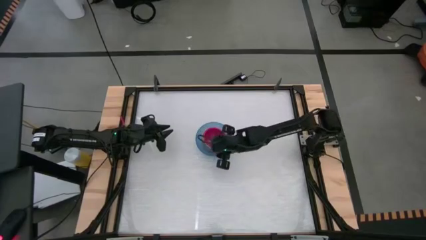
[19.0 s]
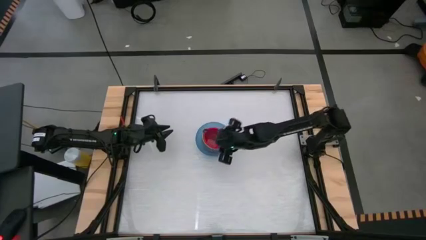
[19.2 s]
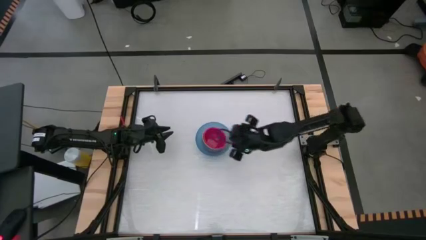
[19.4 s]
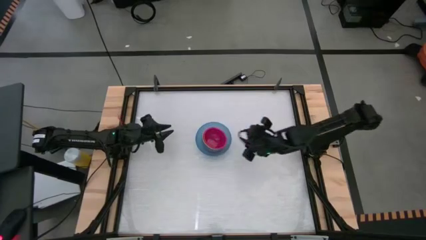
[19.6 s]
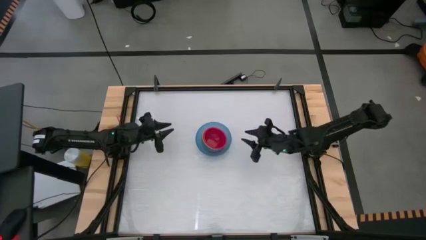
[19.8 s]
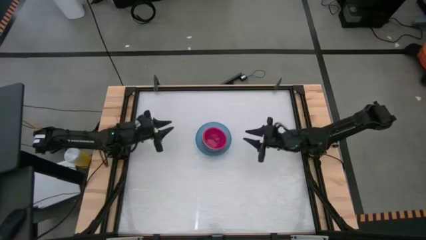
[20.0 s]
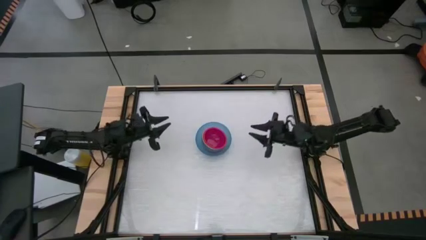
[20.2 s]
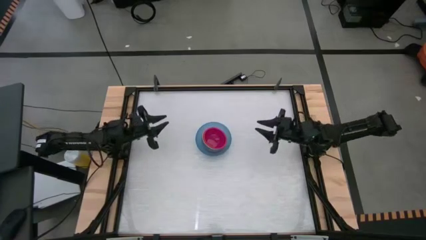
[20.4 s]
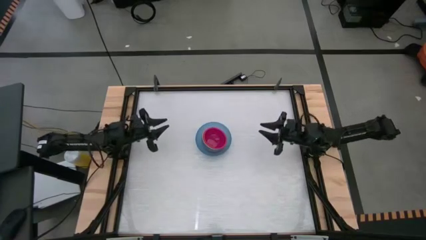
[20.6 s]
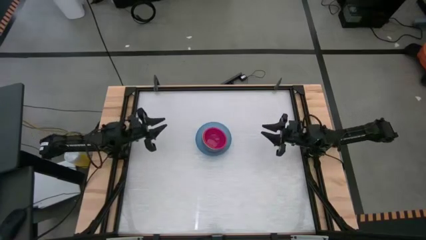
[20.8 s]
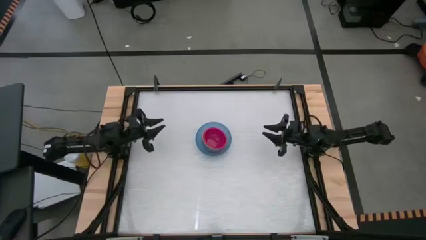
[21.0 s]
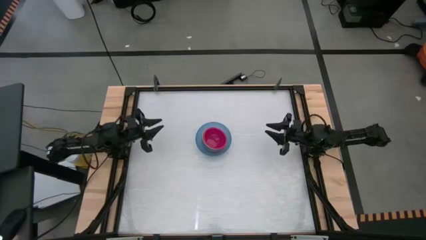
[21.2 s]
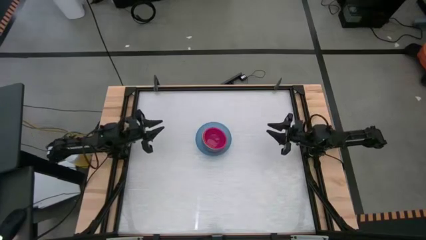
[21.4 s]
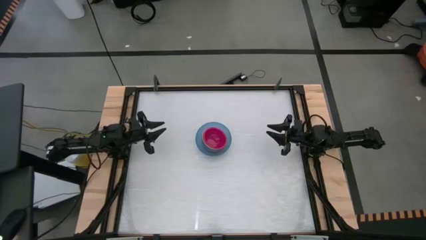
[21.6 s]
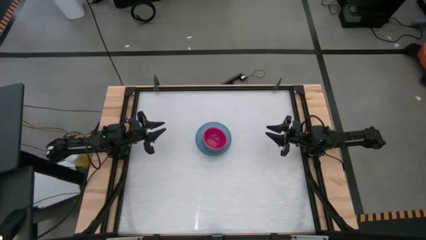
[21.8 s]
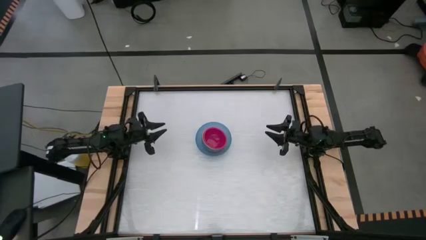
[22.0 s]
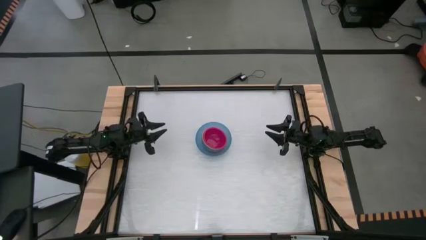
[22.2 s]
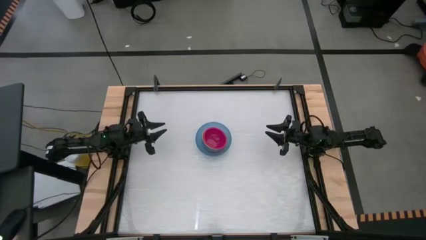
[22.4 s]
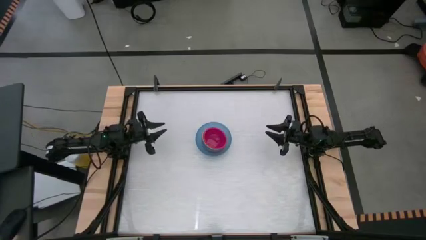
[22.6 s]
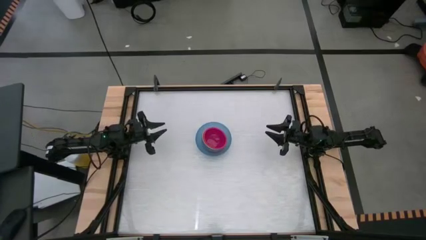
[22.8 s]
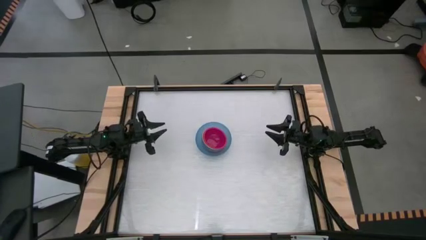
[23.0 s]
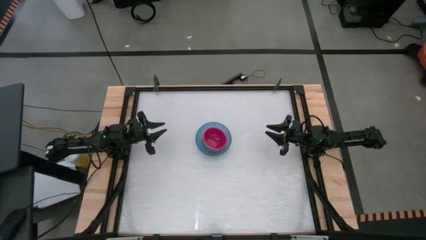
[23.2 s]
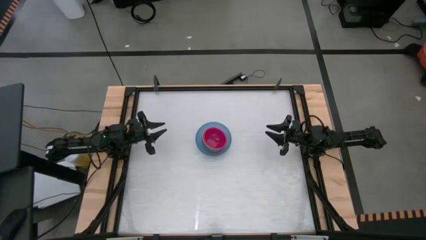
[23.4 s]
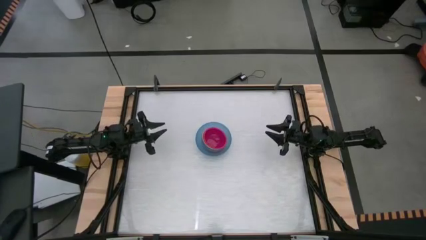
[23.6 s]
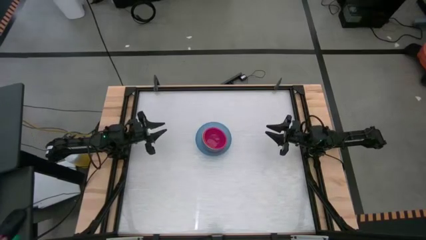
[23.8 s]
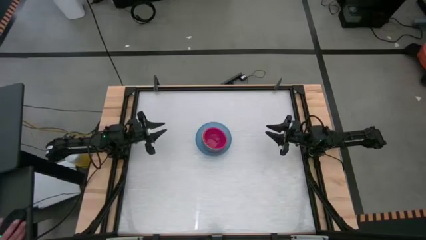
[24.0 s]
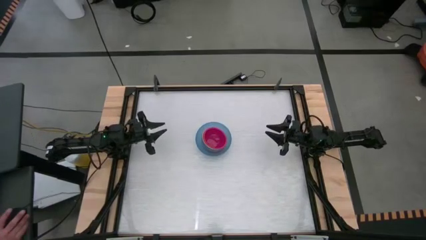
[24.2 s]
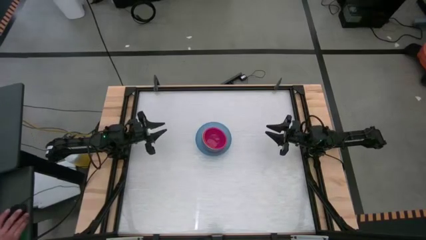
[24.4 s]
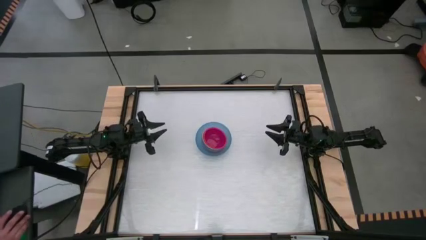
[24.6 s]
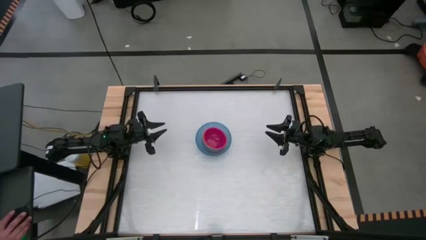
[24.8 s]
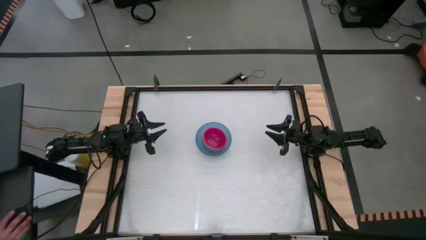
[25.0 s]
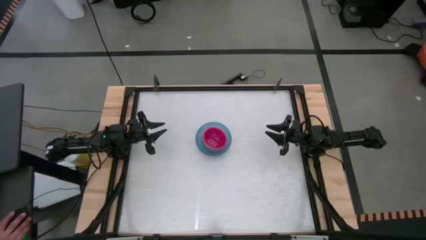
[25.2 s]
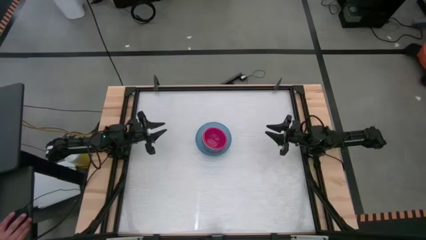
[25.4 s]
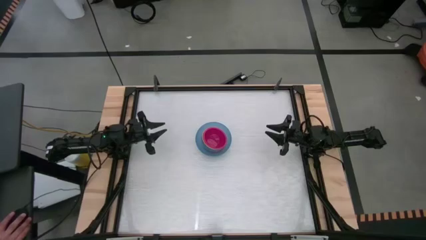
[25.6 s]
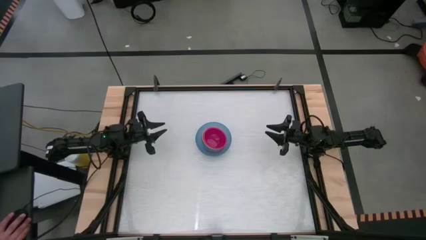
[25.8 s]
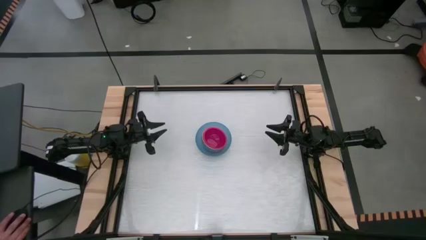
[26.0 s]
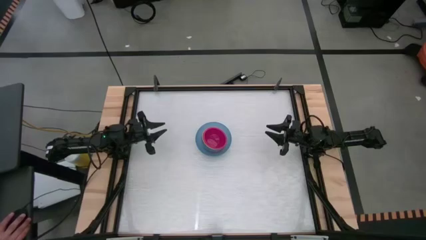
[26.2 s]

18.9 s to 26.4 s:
Return to Home Position
